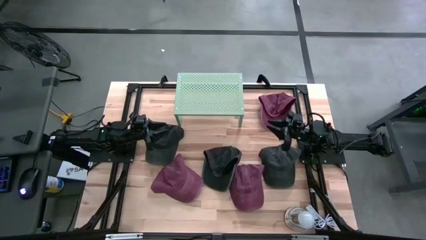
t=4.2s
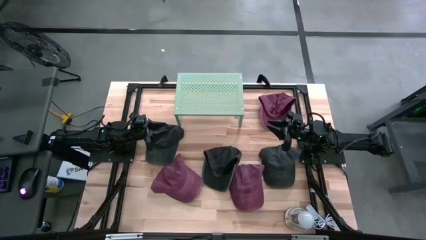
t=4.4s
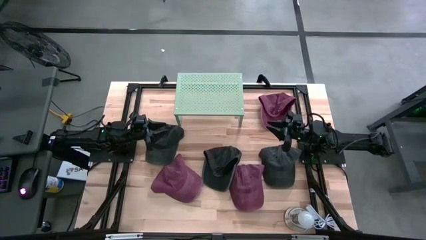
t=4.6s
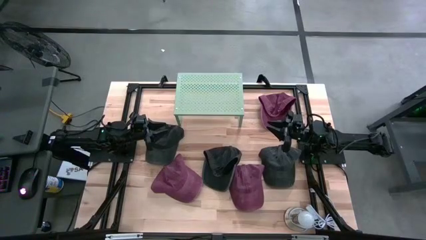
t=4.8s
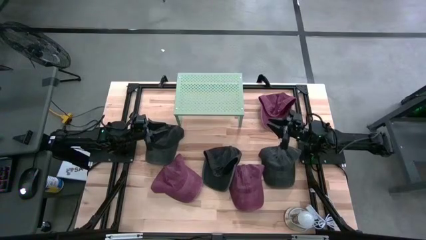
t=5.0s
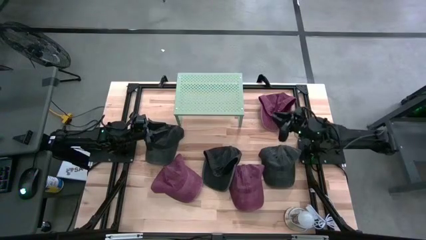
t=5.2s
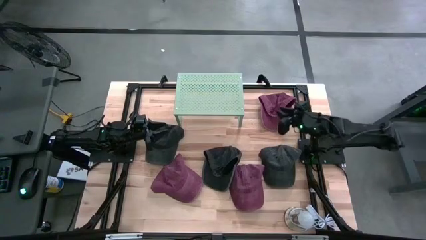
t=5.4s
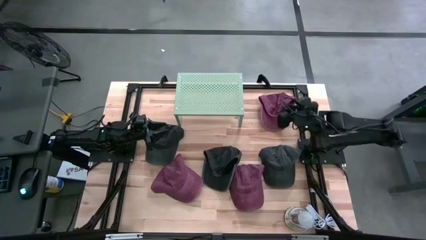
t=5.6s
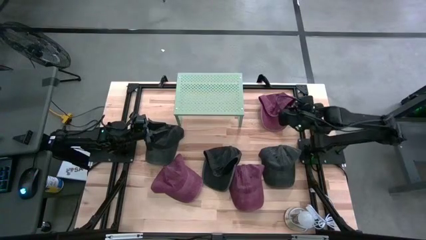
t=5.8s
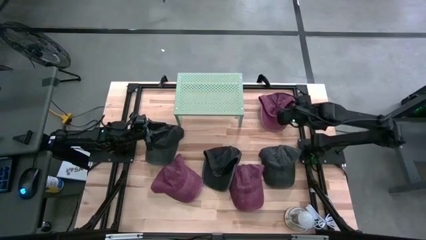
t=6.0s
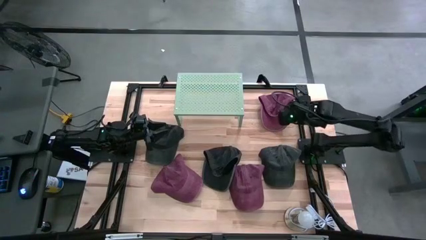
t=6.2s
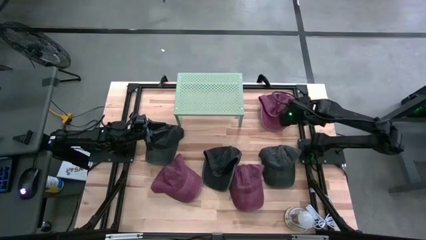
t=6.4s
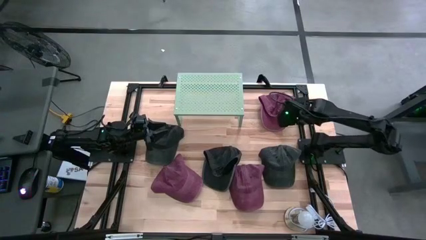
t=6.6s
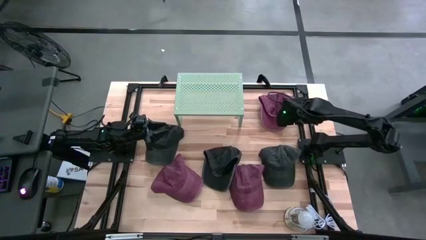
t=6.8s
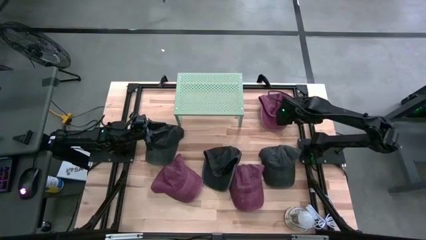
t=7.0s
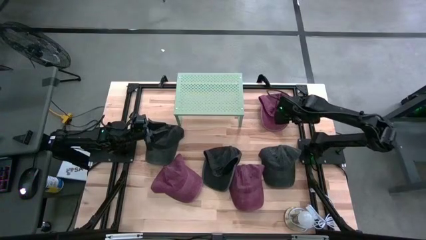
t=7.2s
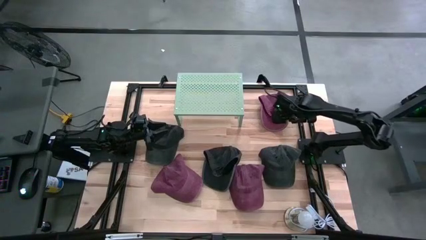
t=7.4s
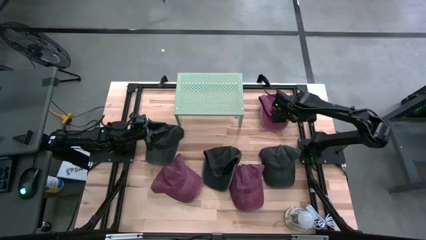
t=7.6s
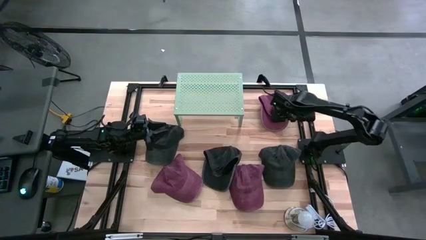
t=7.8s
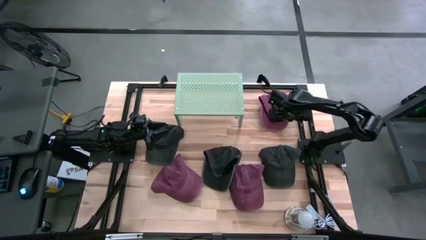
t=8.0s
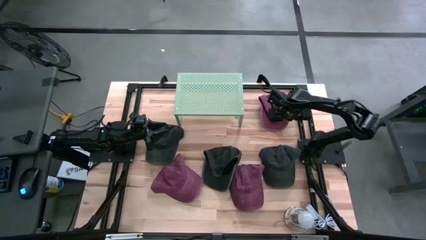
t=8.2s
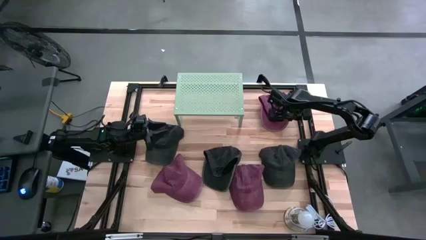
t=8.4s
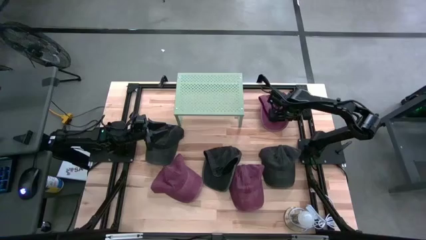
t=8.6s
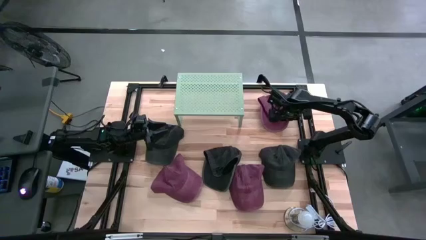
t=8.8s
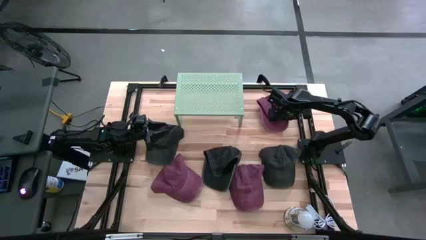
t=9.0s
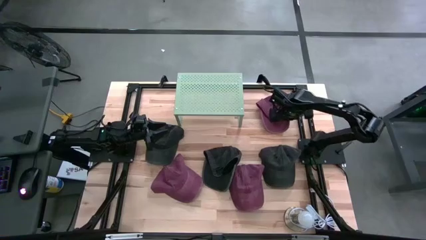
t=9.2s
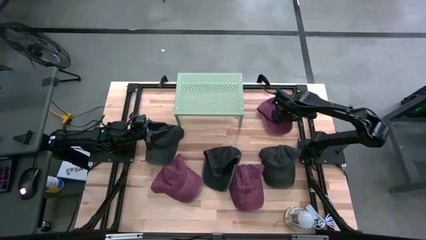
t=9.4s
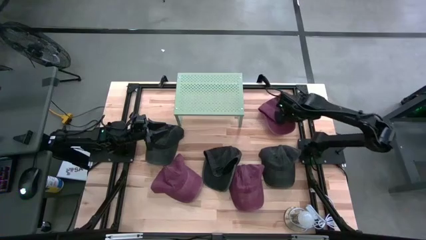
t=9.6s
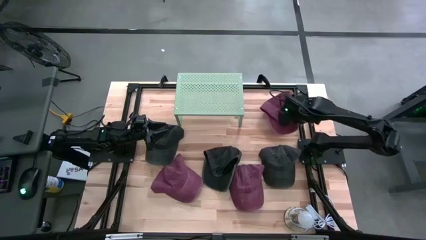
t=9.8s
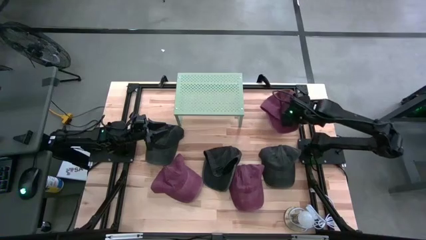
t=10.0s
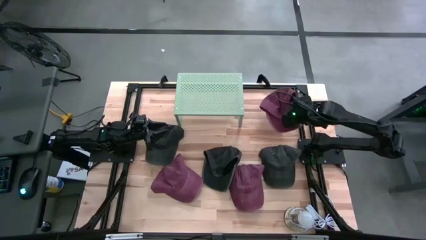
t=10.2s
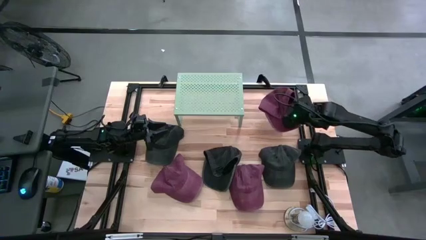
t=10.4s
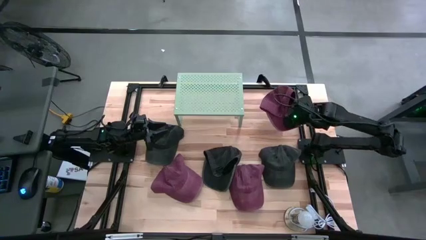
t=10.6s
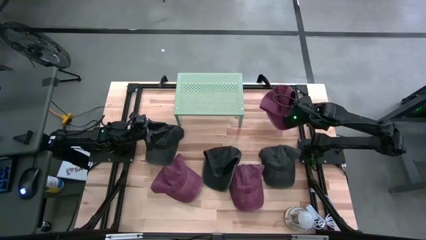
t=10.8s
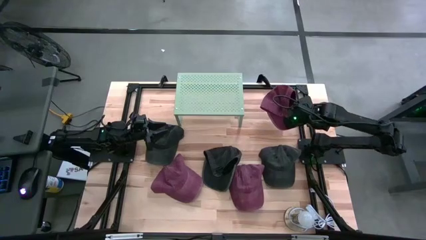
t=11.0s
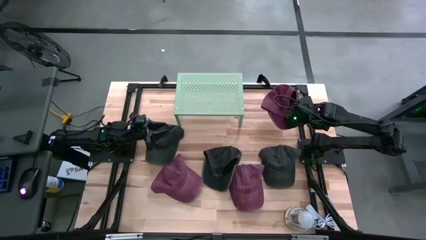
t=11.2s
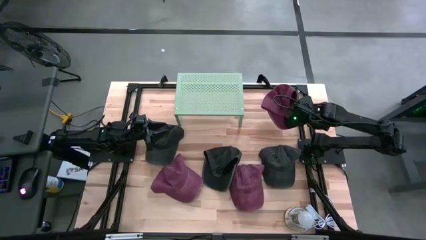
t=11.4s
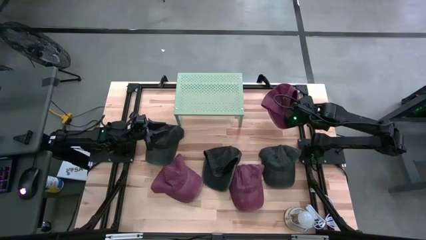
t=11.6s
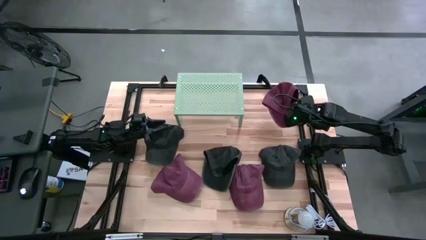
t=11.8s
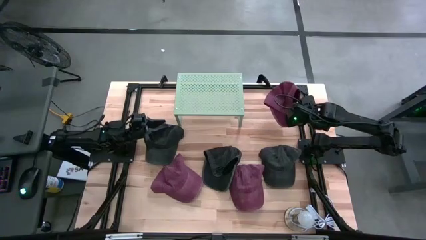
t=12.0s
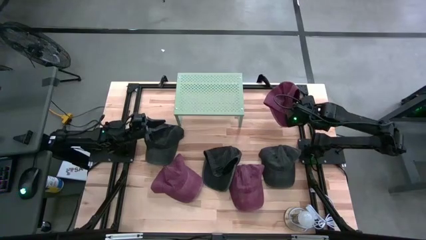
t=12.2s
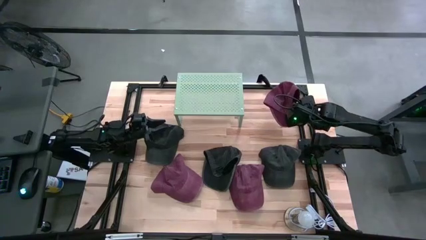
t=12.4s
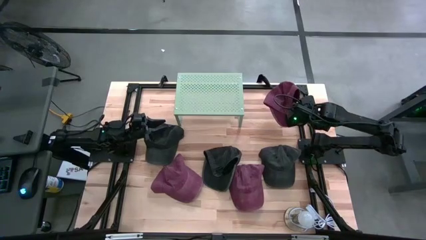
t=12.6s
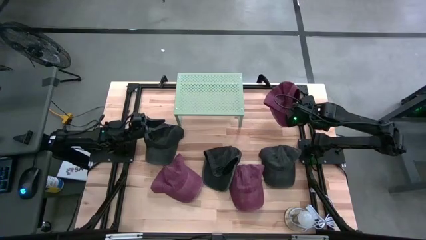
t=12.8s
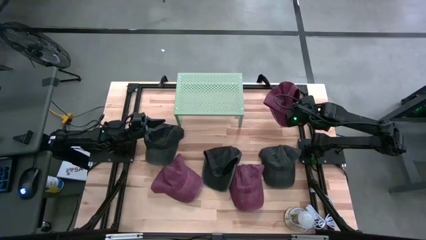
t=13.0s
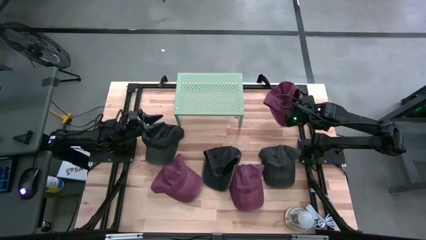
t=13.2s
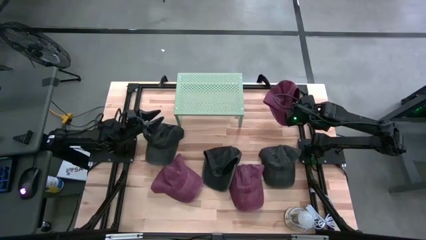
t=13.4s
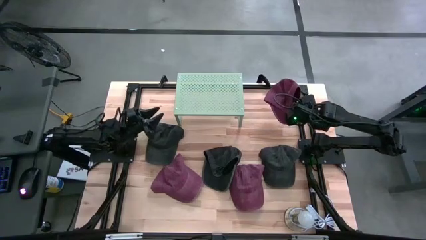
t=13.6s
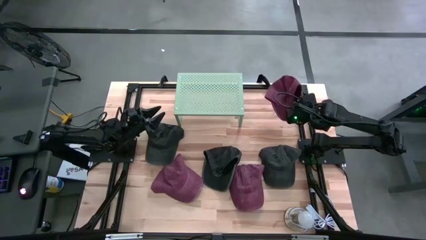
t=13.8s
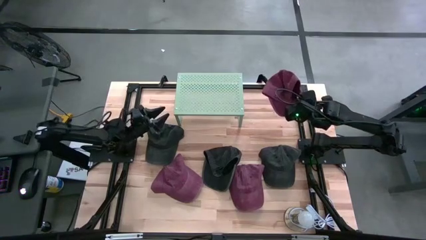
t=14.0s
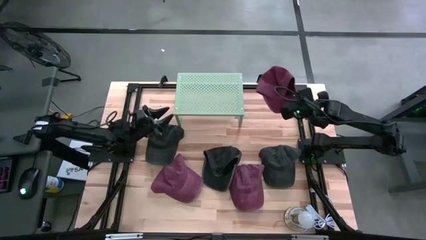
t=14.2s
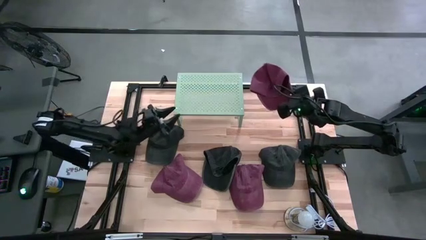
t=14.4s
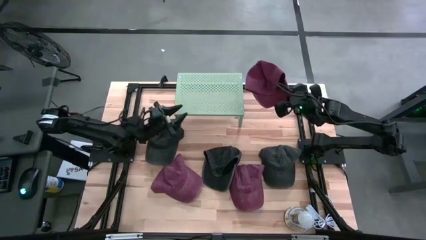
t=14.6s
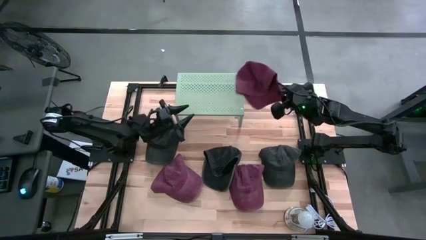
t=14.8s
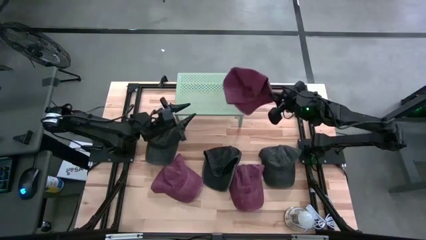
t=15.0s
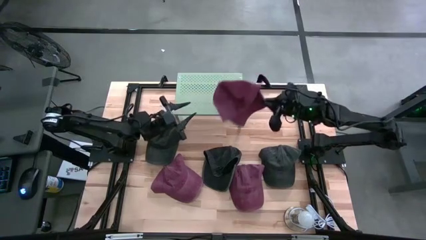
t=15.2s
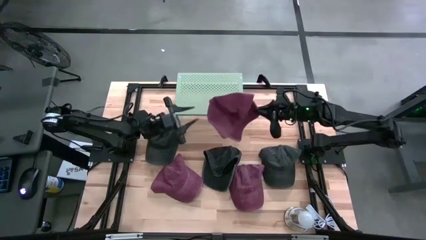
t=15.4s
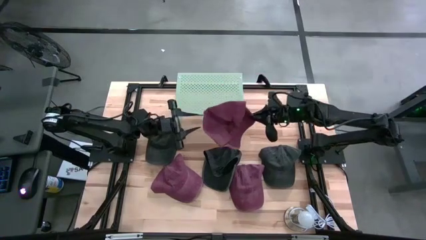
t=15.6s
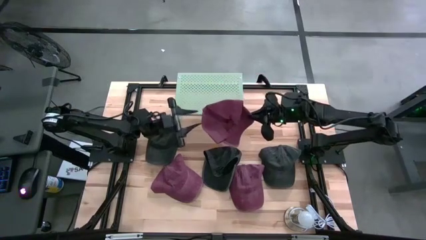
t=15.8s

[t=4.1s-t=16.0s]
Task: Pick & Place hat
Put the top maroon cap on the right side of the shelf

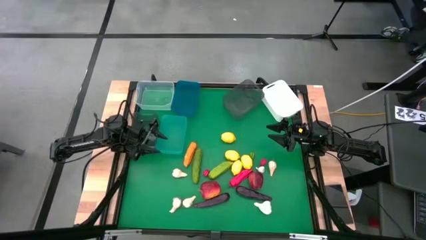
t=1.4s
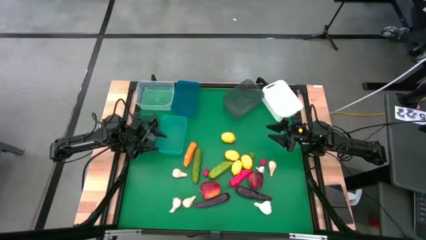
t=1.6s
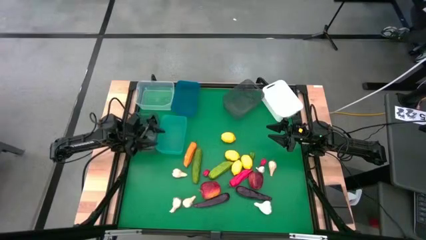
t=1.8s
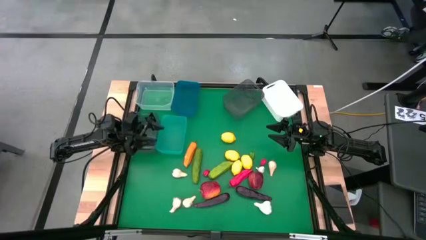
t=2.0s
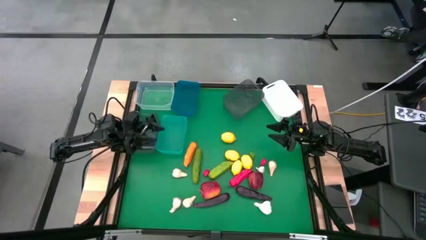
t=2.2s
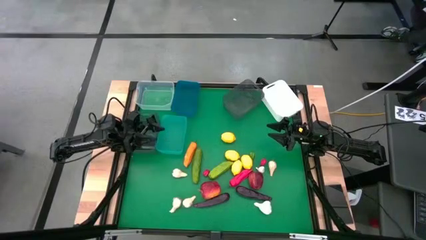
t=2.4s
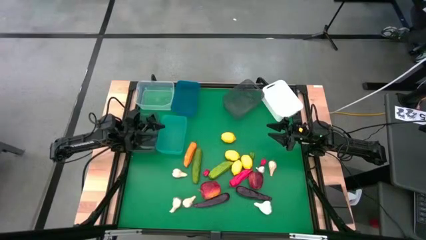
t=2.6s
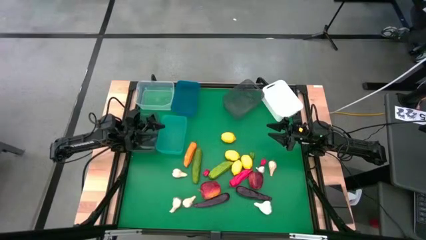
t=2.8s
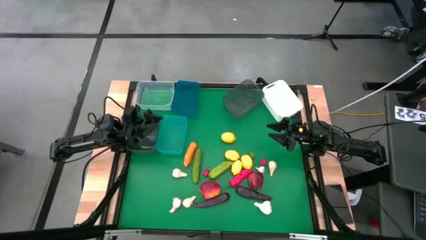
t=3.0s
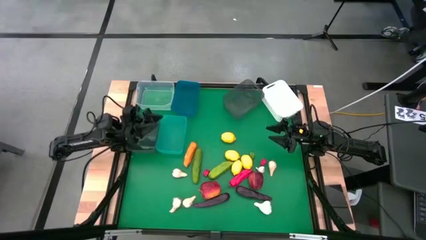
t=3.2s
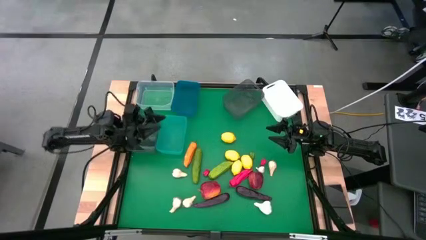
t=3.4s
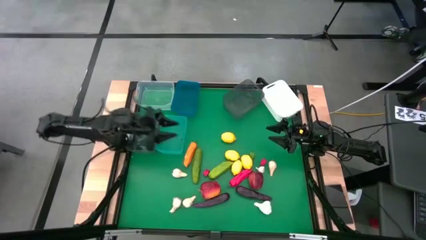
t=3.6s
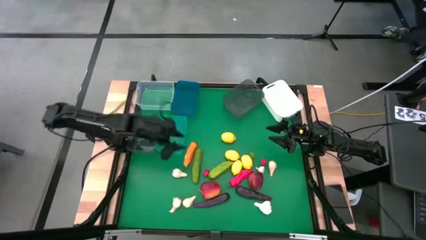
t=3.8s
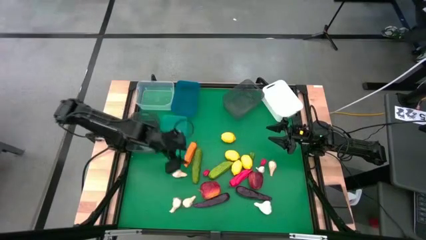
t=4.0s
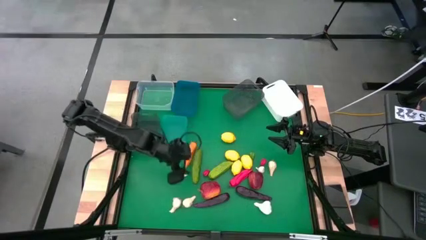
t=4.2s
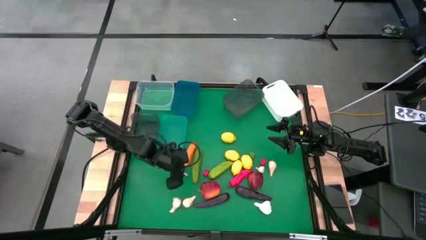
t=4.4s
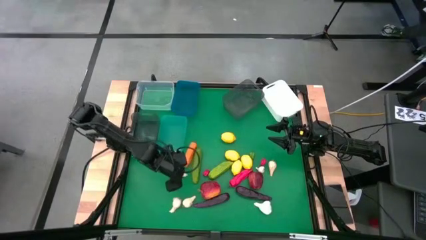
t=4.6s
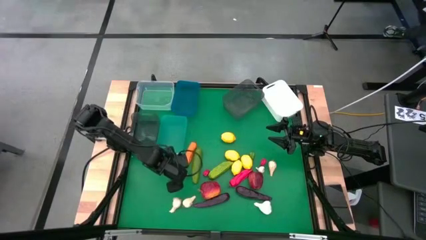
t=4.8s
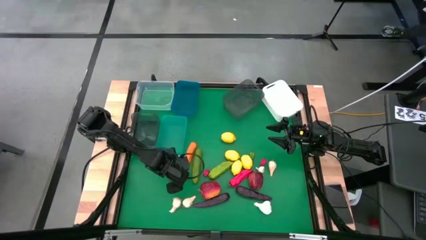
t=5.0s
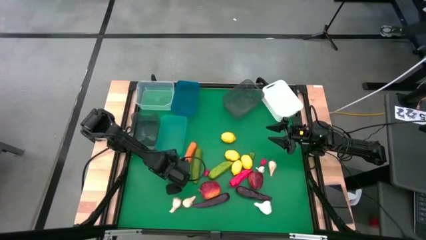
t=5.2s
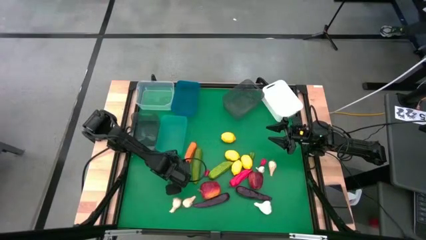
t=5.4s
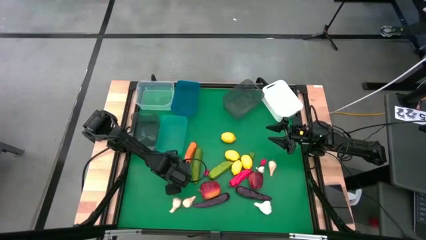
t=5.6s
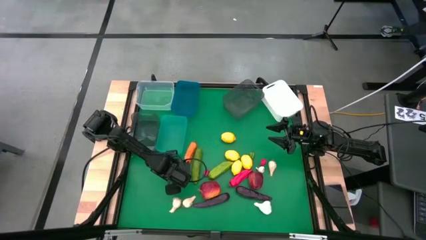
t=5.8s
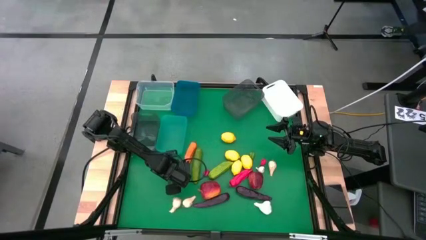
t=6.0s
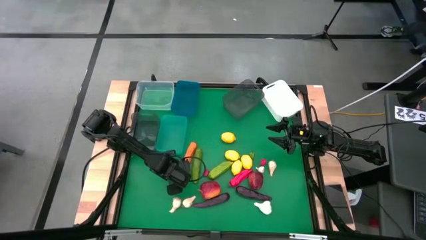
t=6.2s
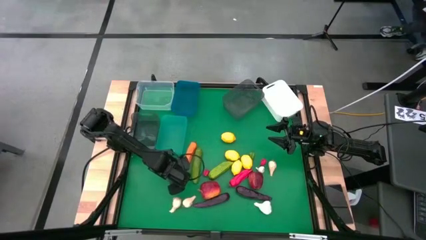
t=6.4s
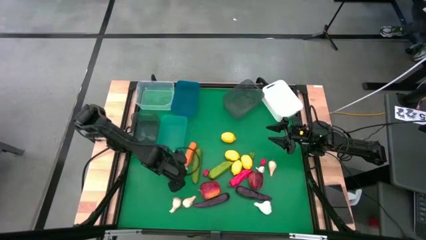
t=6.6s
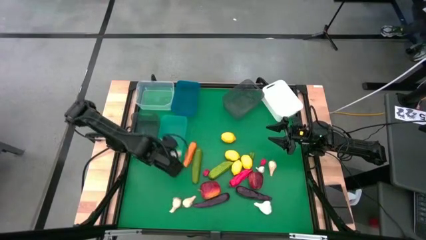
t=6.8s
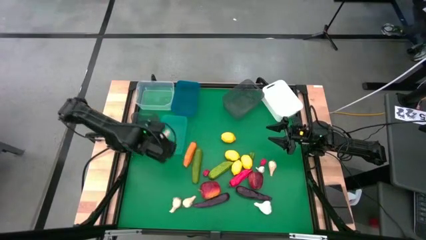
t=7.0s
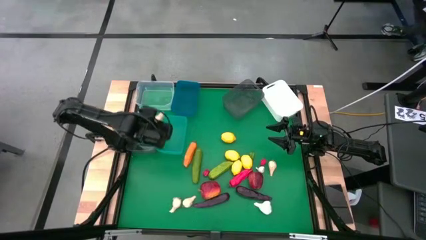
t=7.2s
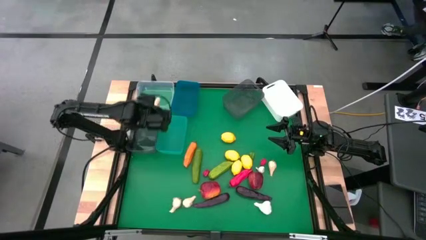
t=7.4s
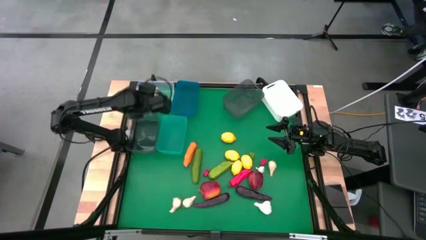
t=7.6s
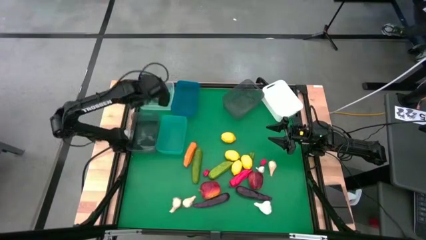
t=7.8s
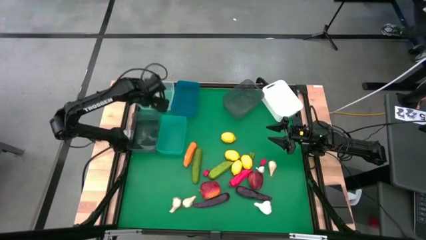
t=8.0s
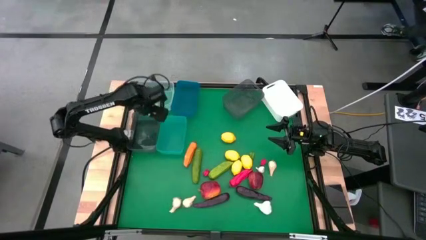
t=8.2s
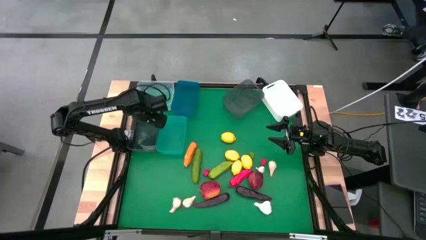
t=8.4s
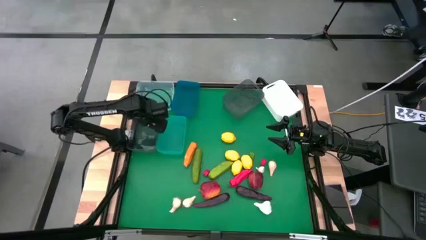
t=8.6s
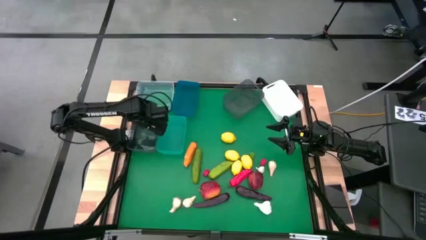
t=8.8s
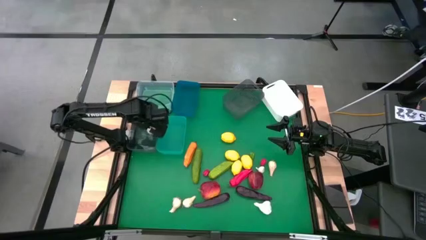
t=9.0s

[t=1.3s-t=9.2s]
Task: Sort produce into baskets
Put the white garlic into the left black bin
